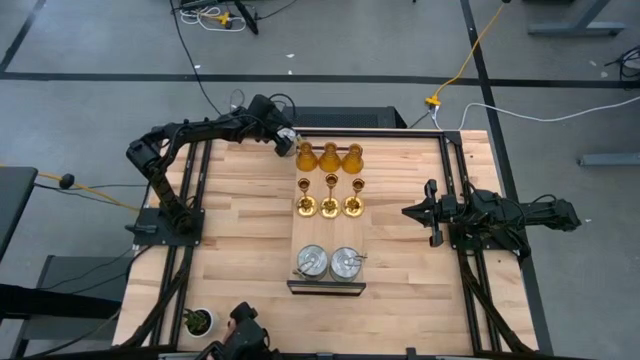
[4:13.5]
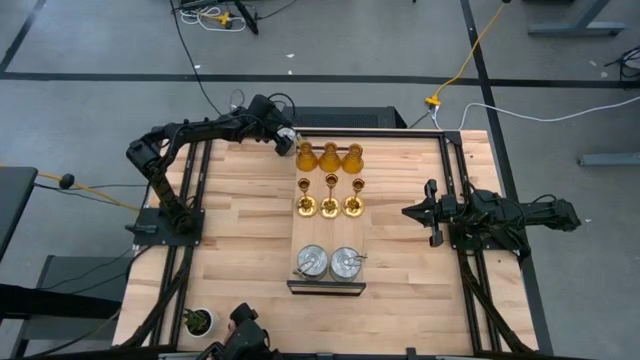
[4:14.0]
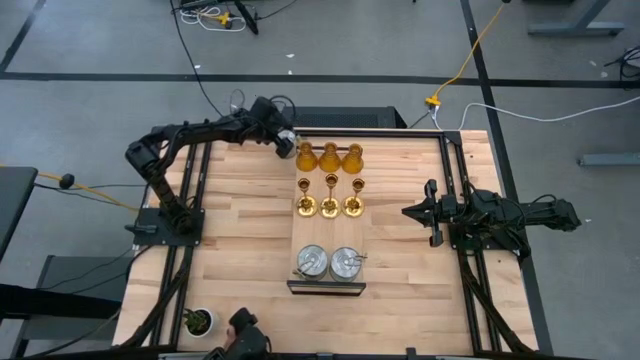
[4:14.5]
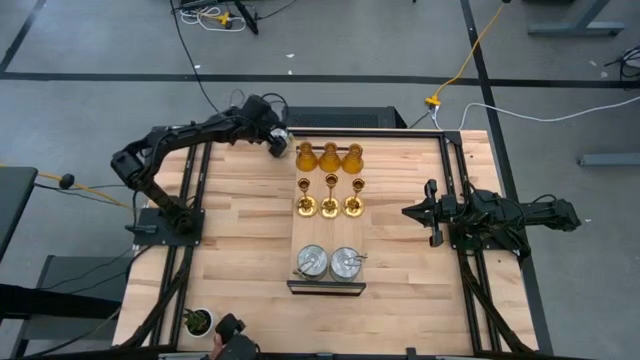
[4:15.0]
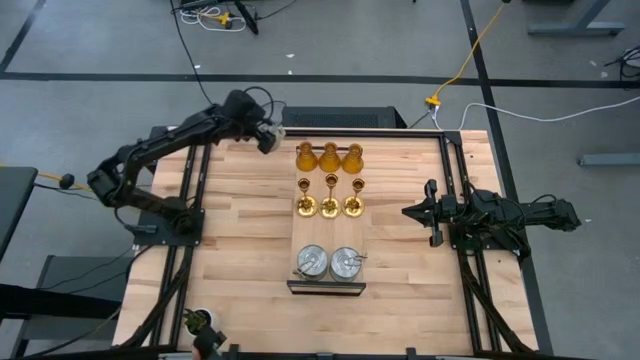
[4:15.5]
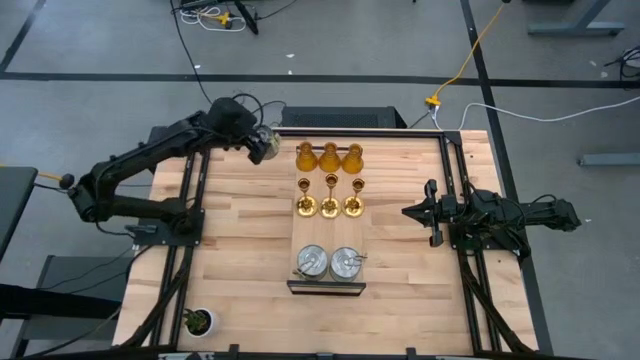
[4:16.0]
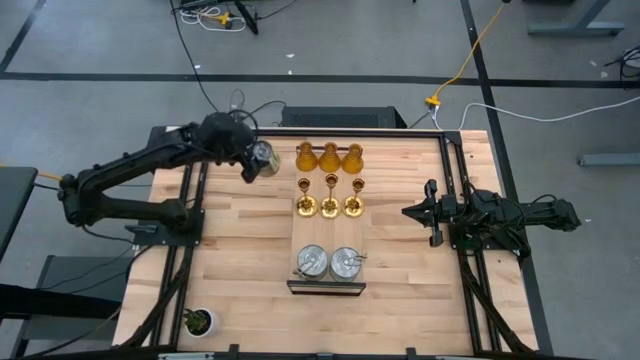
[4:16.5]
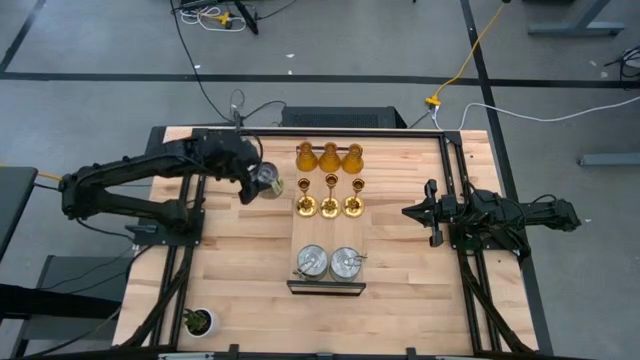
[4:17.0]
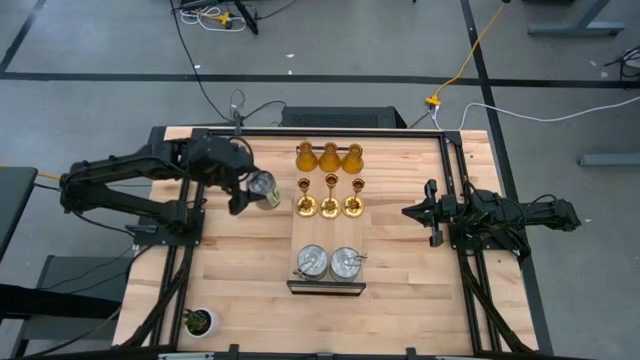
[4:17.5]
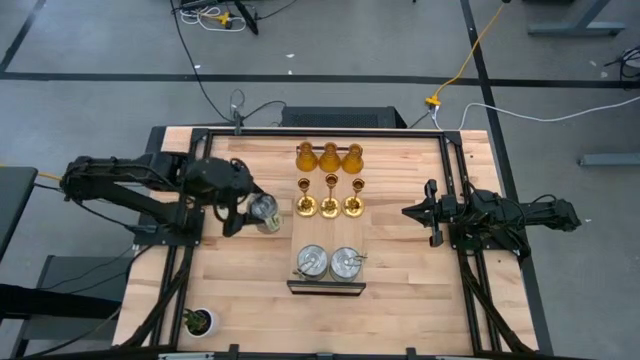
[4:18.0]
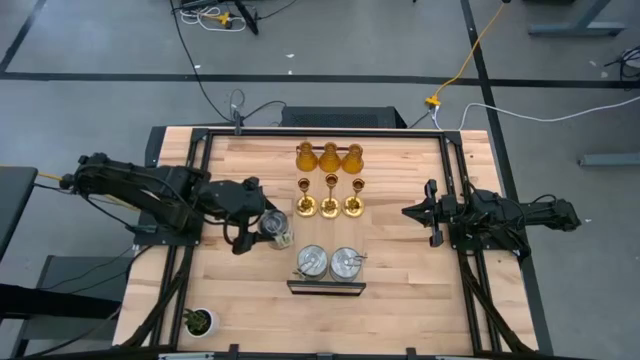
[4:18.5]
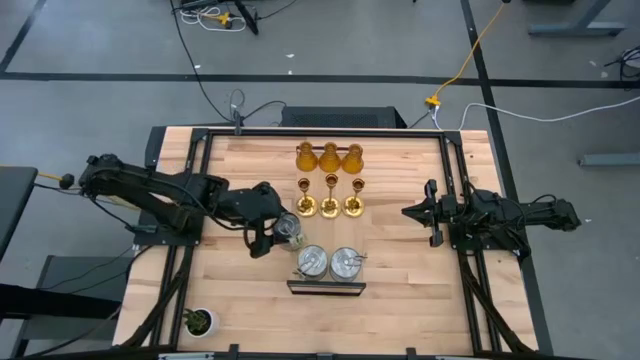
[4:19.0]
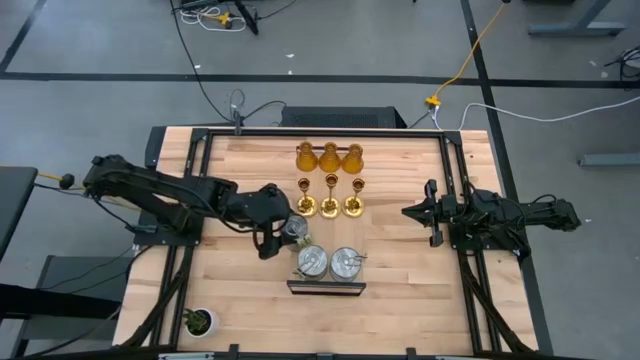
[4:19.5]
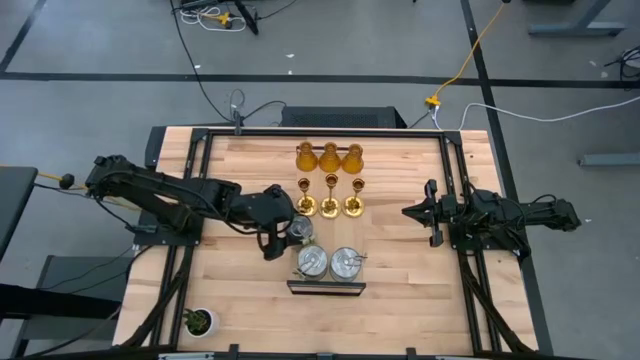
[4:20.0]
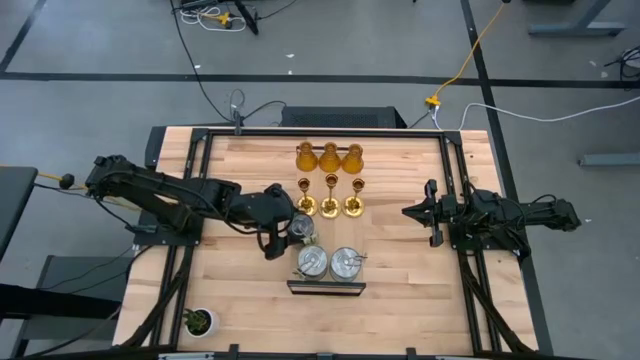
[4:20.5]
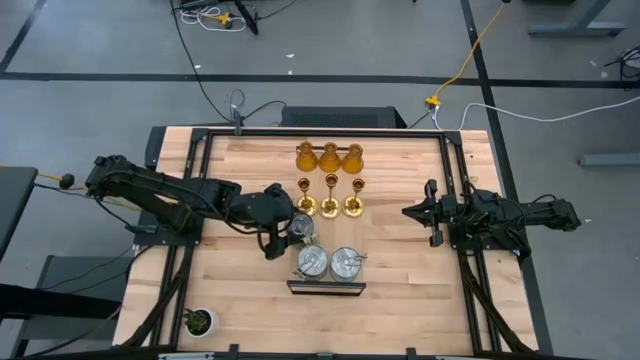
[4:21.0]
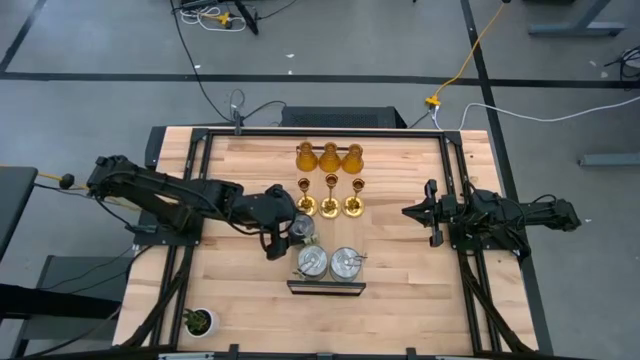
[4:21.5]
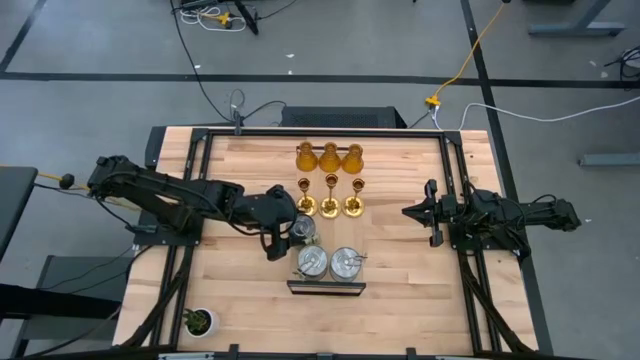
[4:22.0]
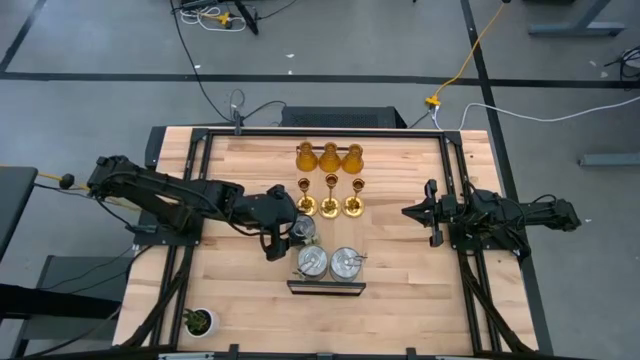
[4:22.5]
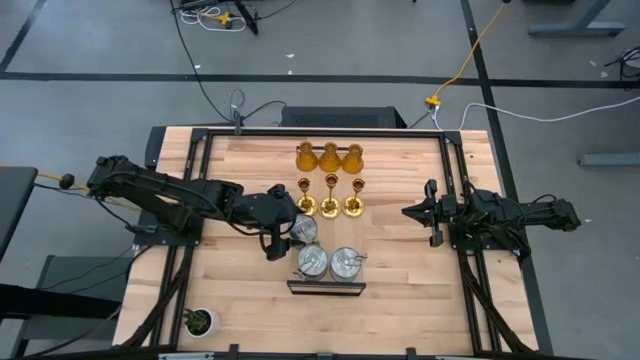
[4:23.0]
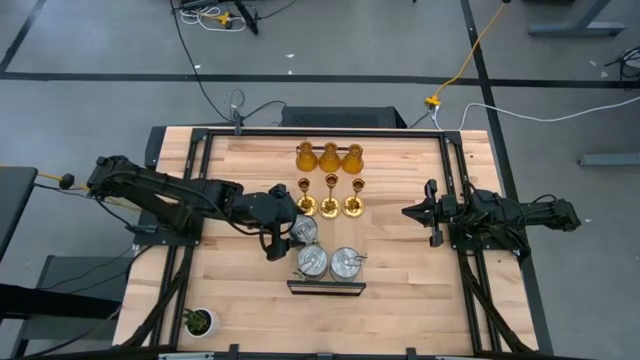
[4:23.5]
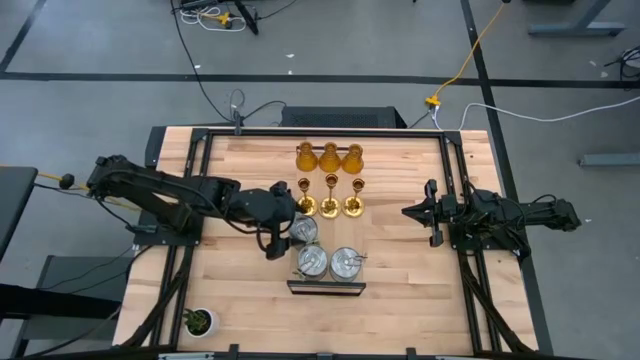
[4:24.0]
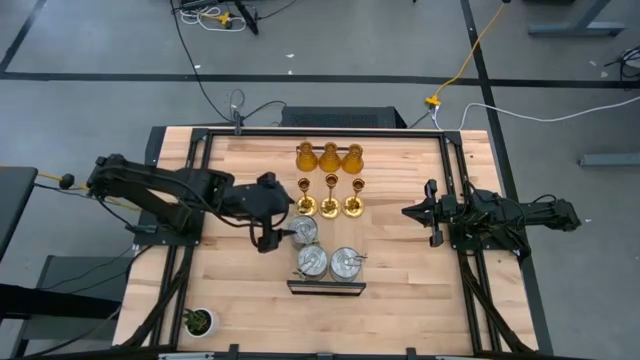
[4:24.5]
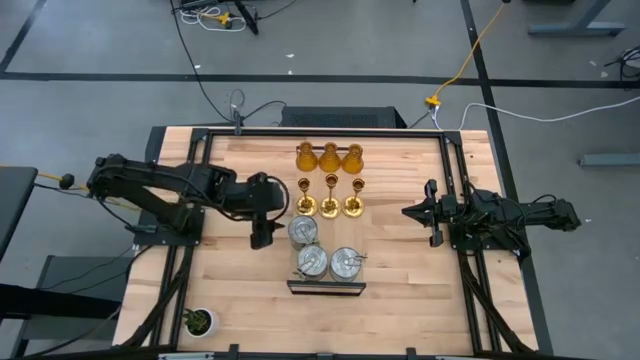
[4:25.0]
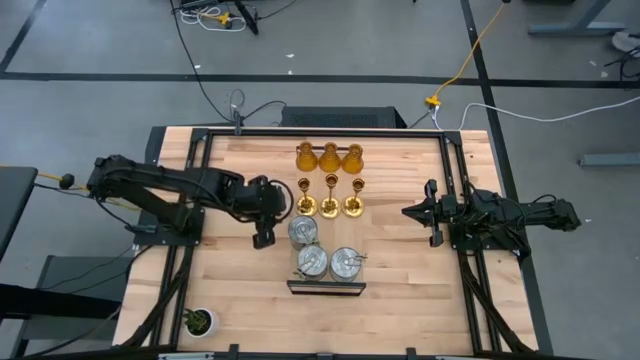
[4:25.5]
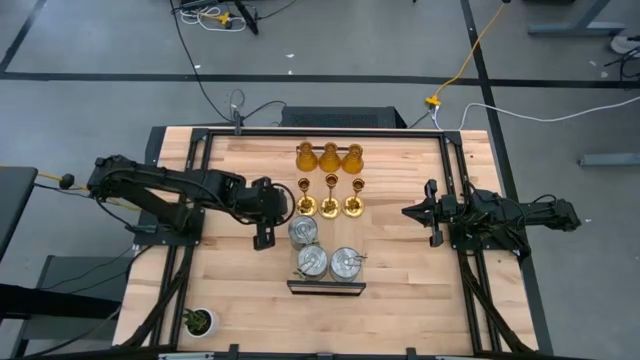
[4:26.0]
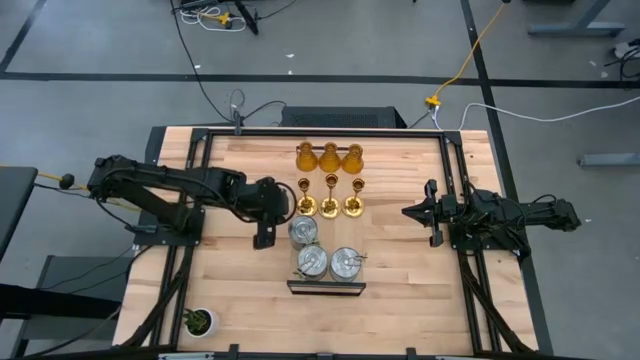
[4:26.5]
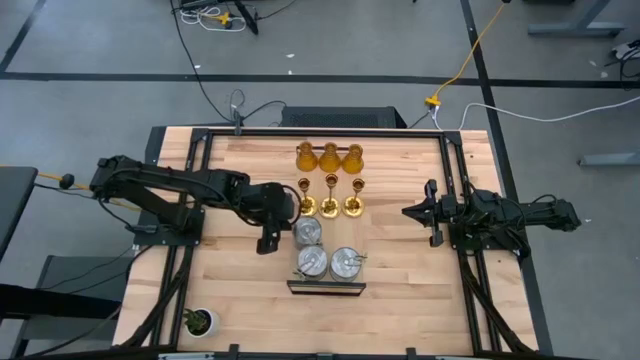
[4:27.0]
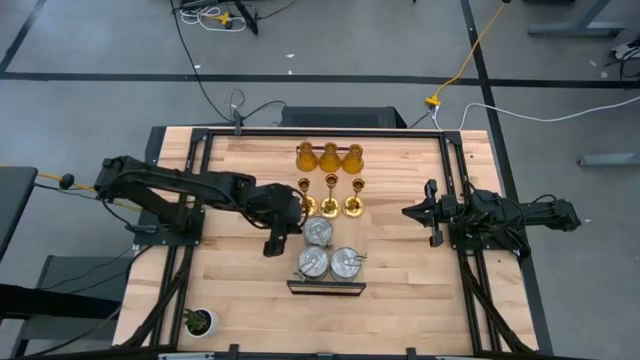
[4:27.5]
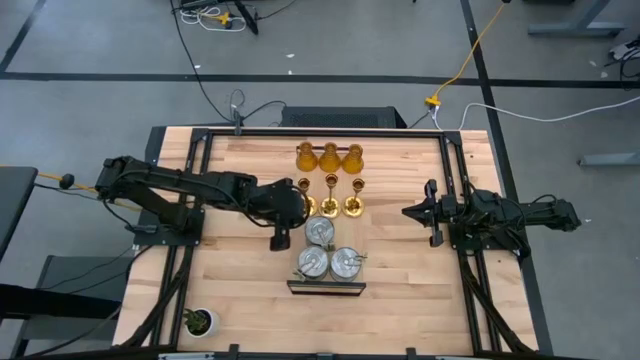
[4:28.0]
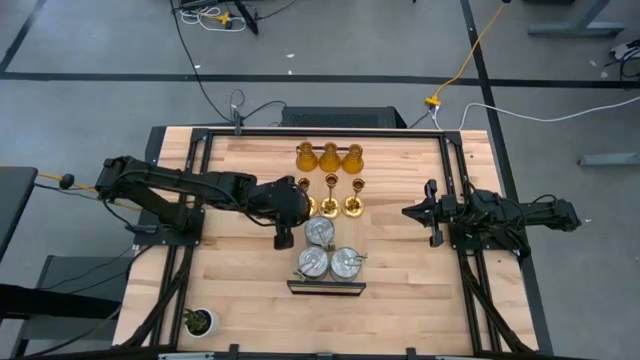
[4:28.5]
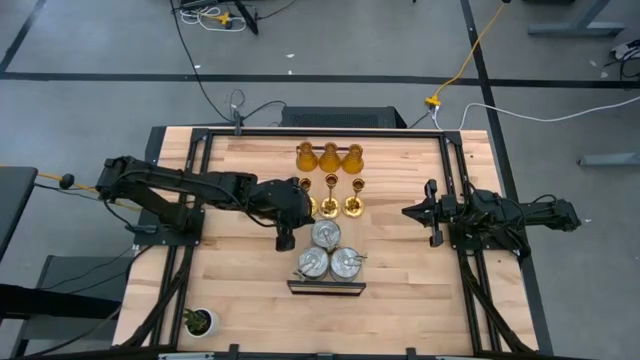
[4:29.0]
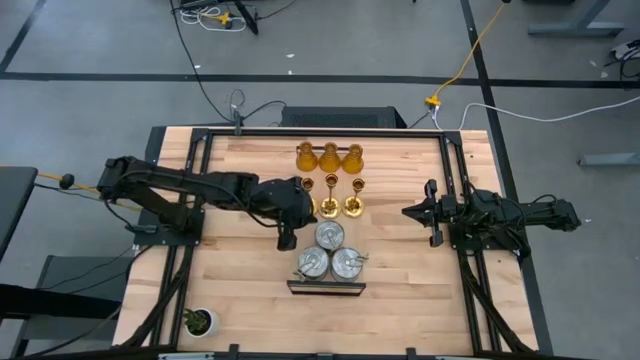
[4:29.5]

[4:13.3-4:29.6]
Task: Pick & Place candle stick holders
Put the scented candle on the shelf

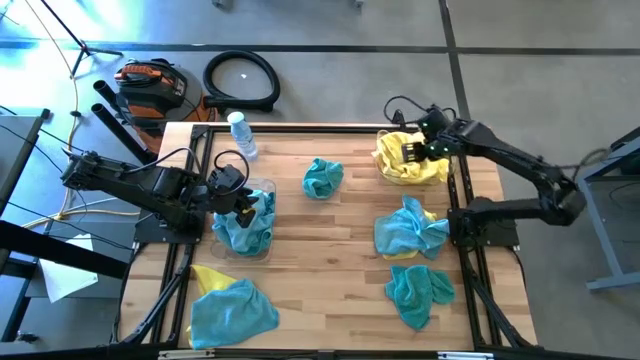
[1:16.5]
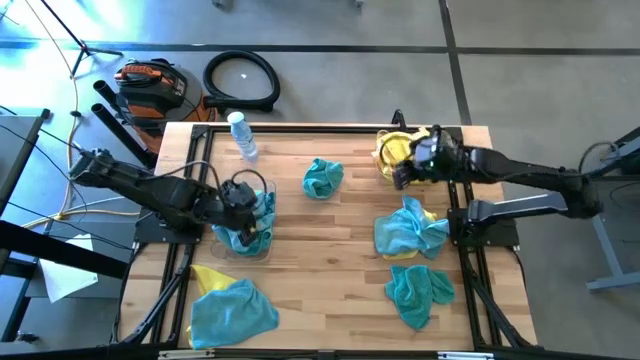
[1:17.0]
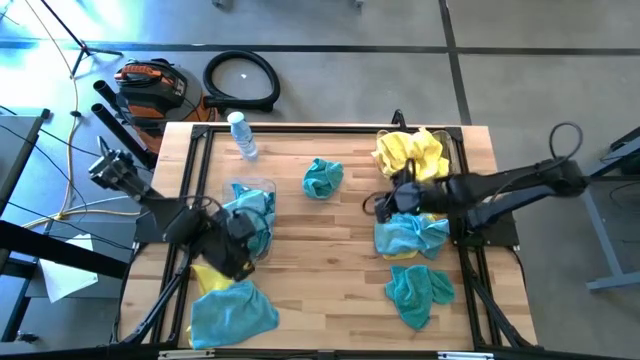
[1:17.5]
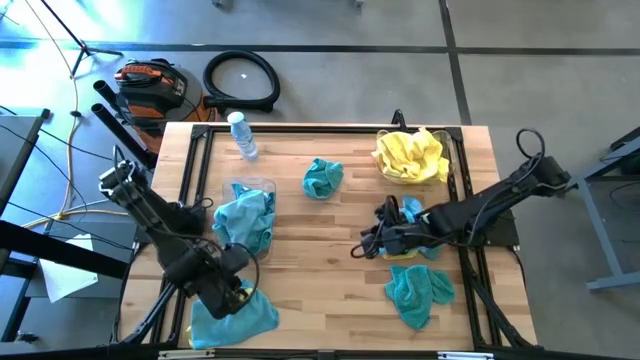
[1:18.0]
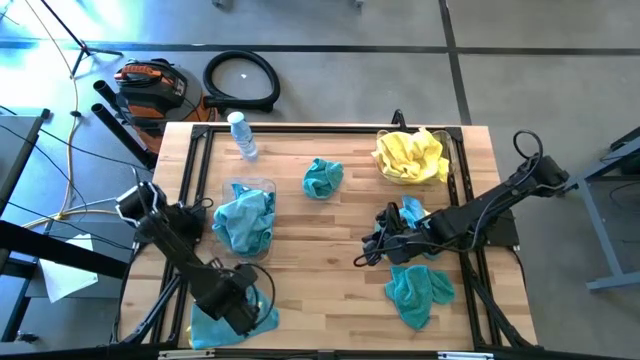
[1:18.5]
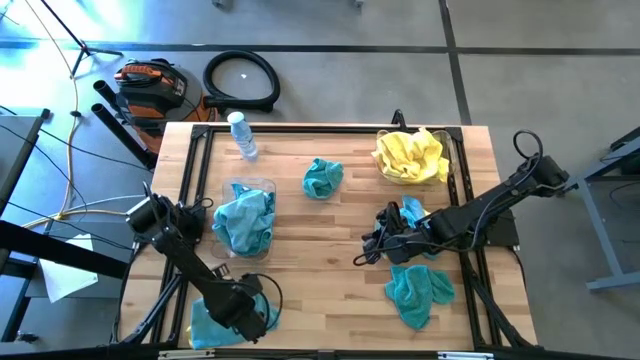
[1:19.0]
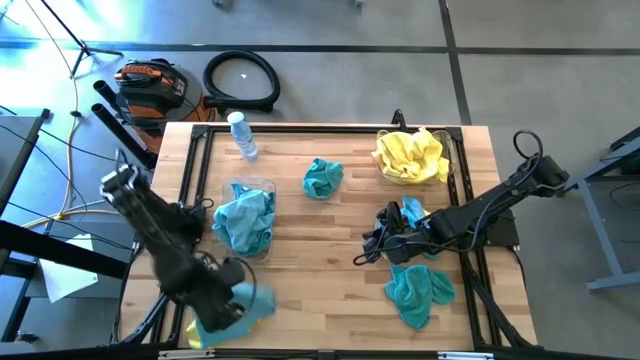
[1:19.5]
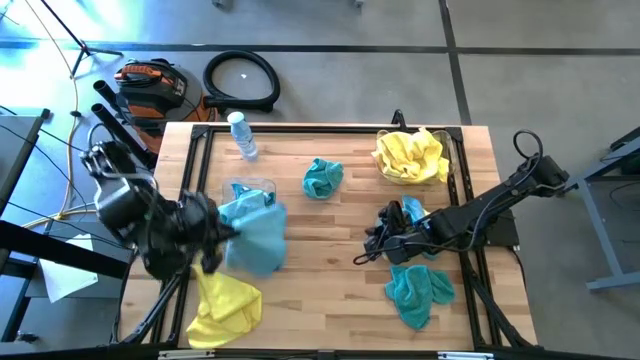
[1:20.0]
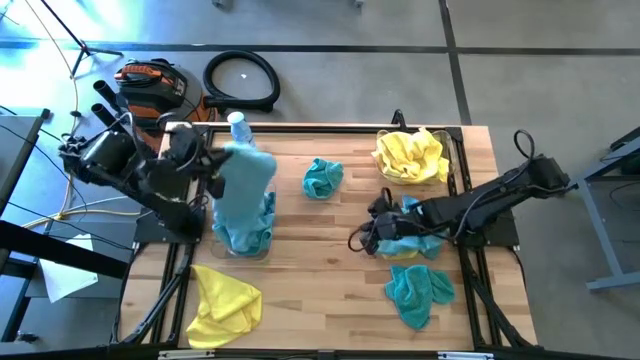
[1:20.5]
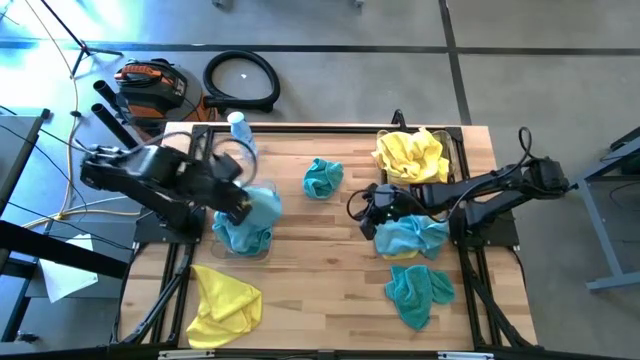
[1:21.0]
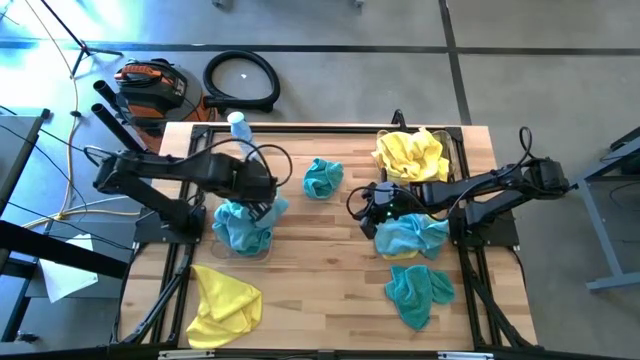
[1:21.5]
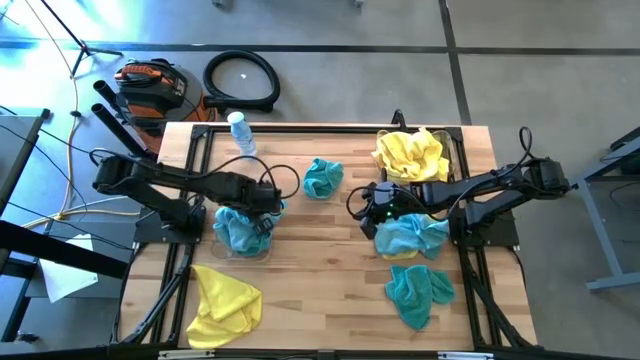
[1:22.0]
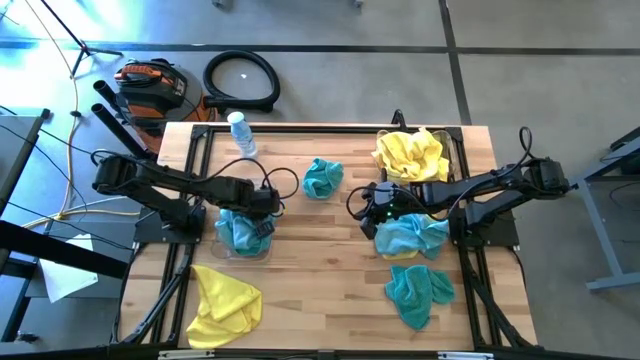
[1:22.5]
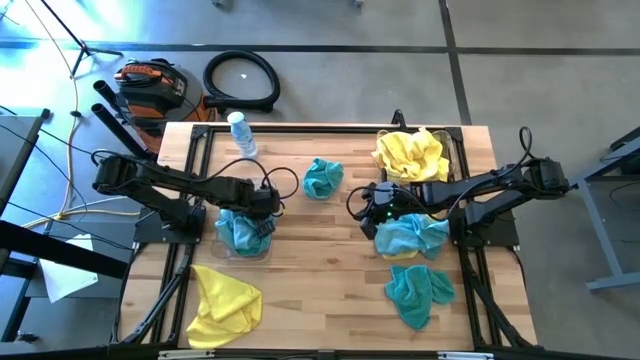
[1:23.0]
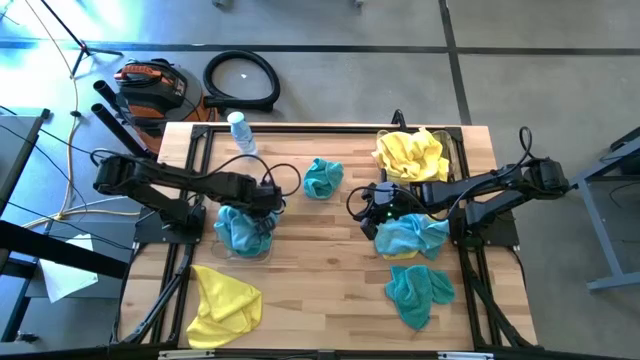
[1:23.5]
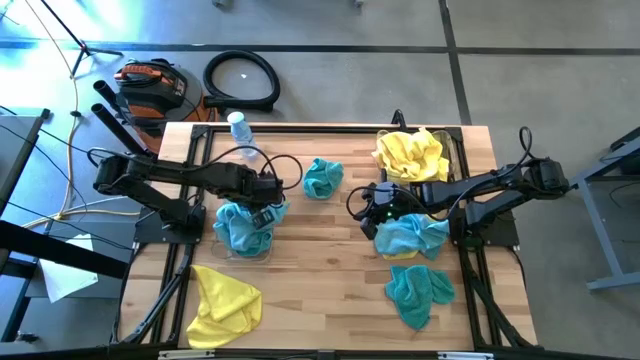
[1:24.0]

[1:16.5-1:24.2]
Task: Sort microfiber towel by color & place in baskets
Put the blue microfiber cloth into the left transparent bin
